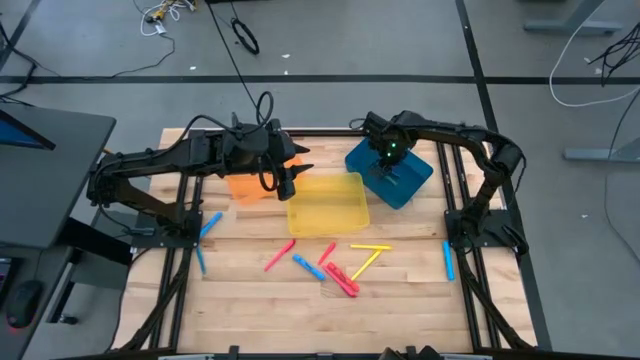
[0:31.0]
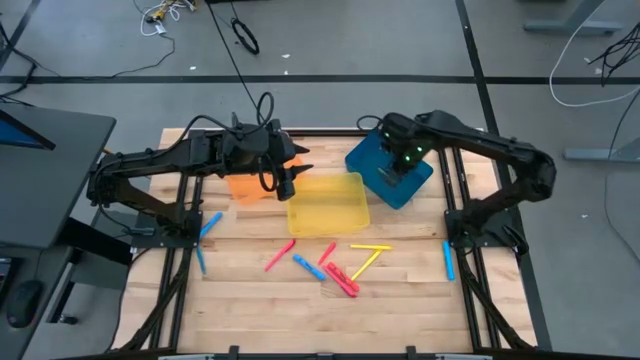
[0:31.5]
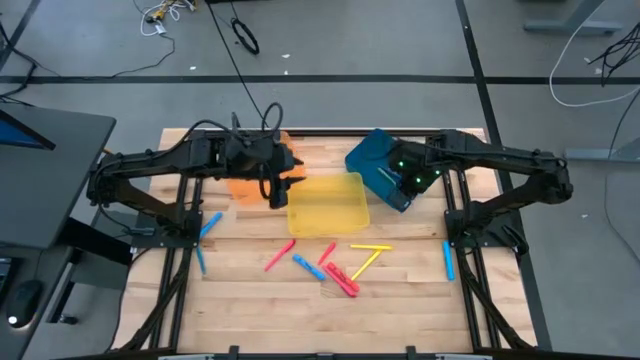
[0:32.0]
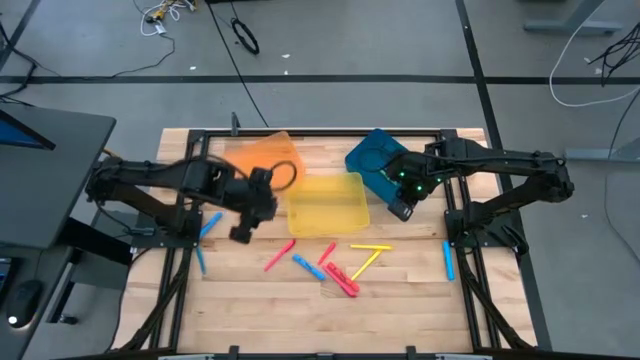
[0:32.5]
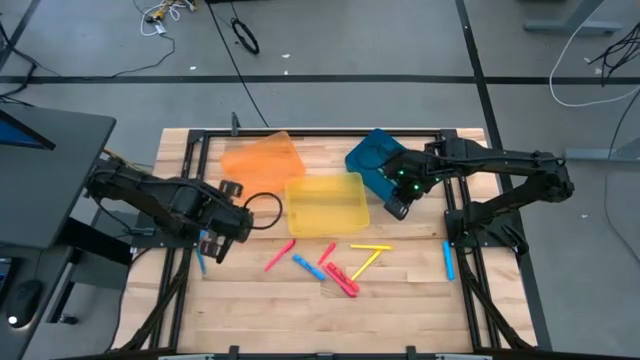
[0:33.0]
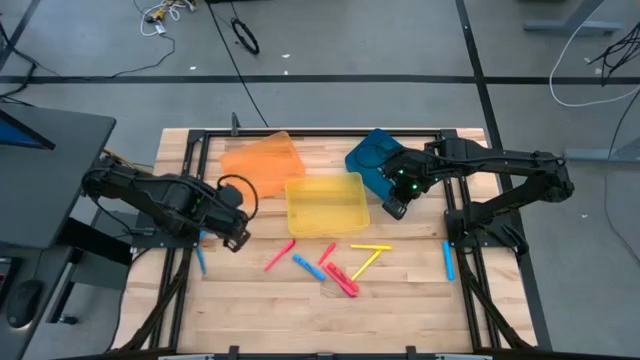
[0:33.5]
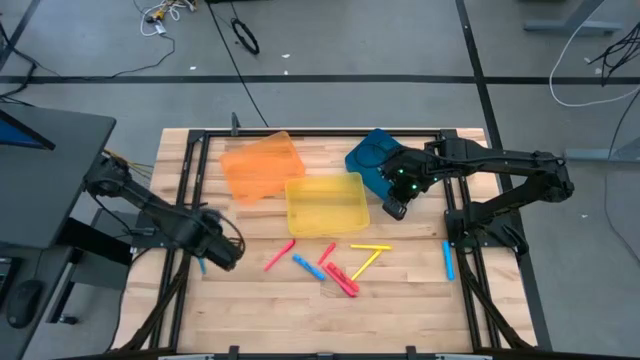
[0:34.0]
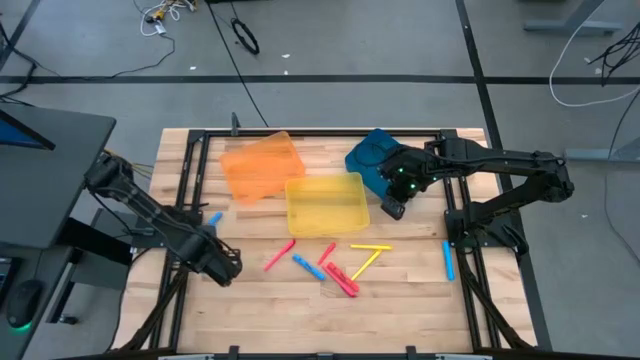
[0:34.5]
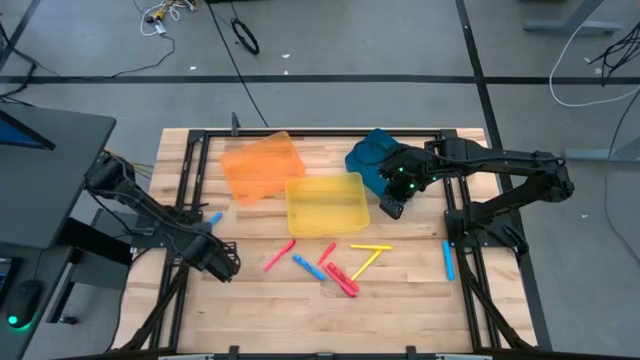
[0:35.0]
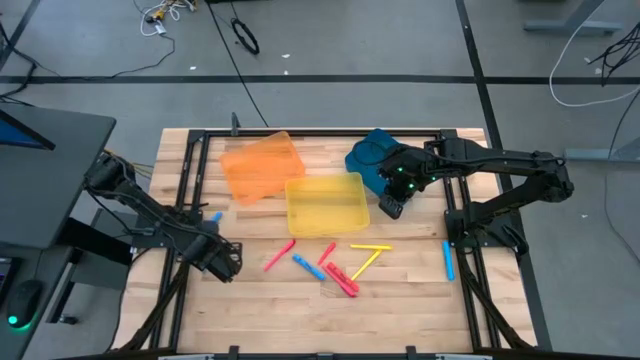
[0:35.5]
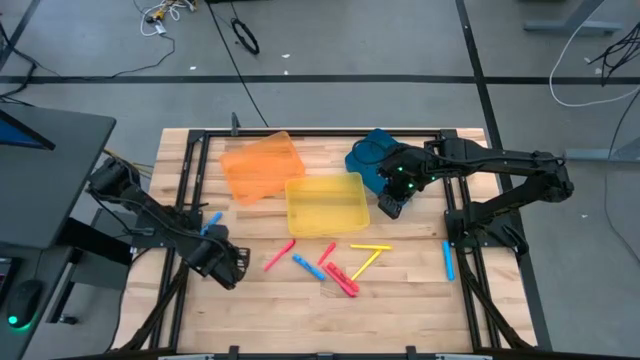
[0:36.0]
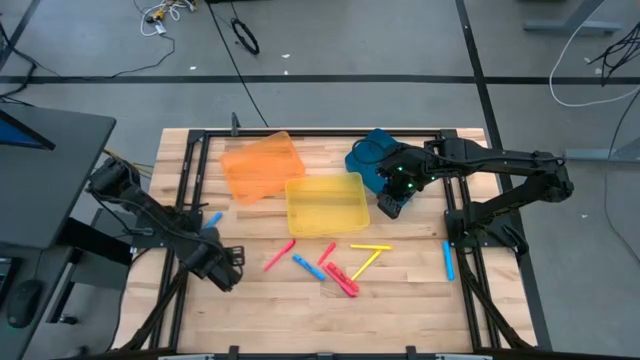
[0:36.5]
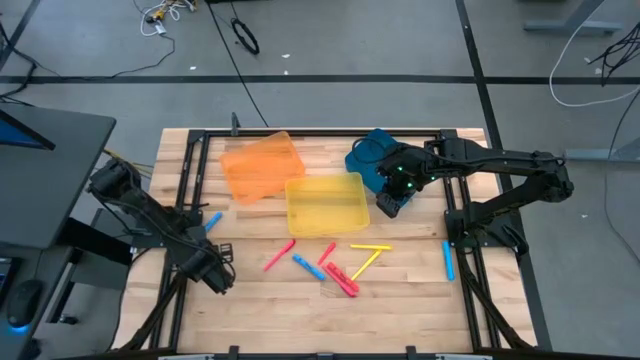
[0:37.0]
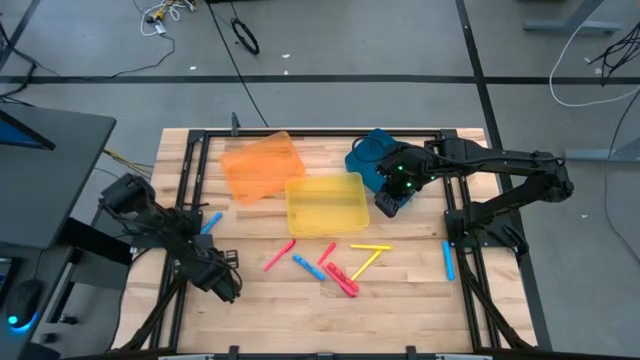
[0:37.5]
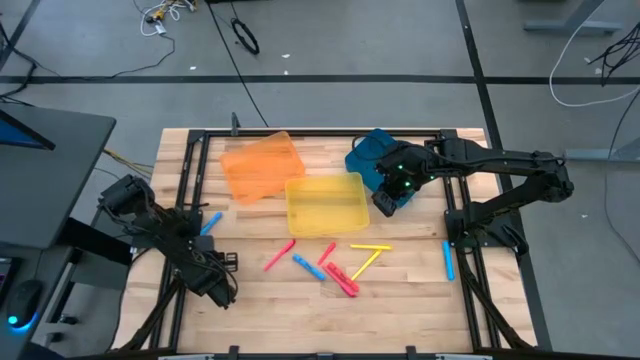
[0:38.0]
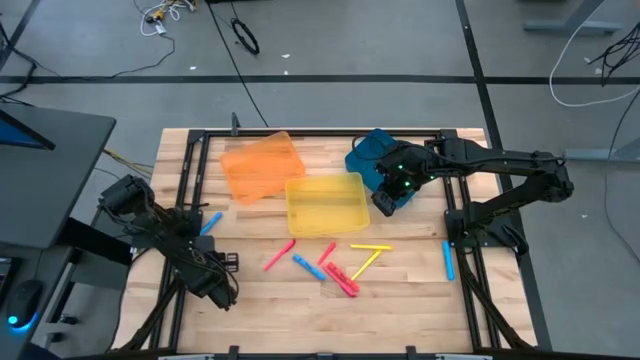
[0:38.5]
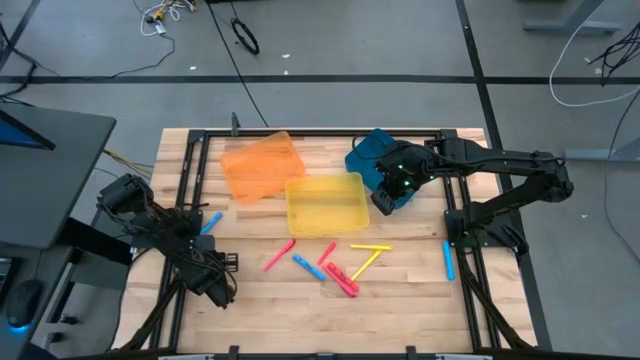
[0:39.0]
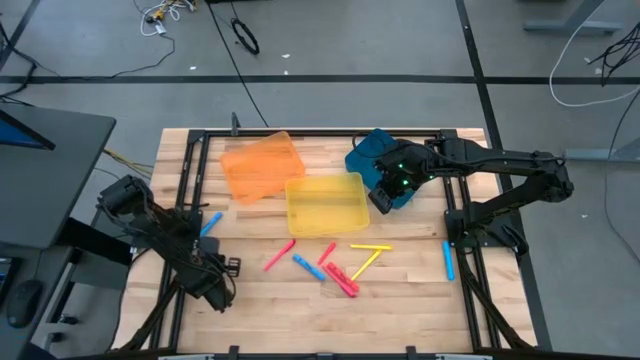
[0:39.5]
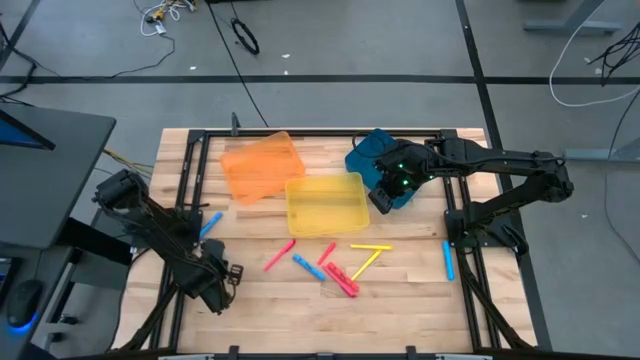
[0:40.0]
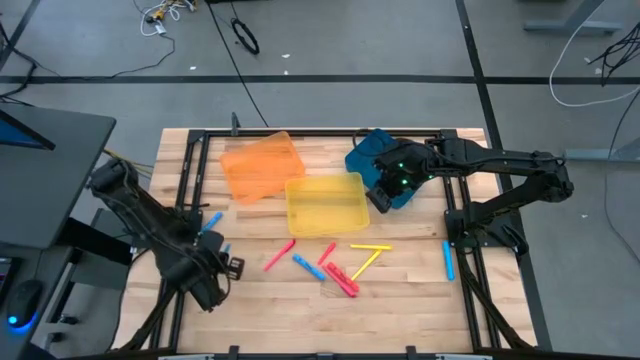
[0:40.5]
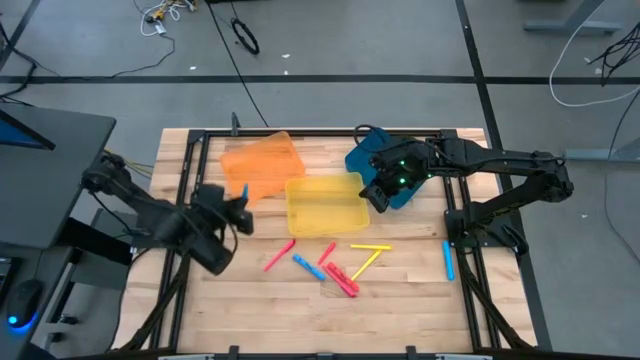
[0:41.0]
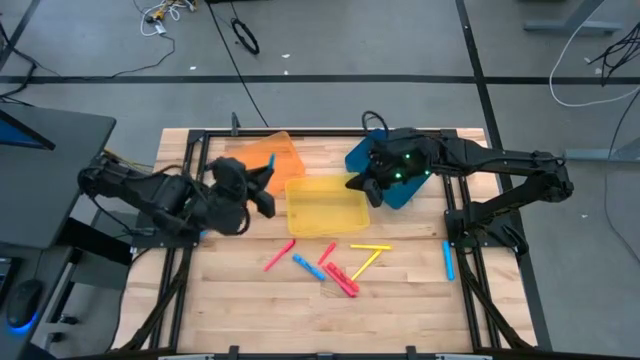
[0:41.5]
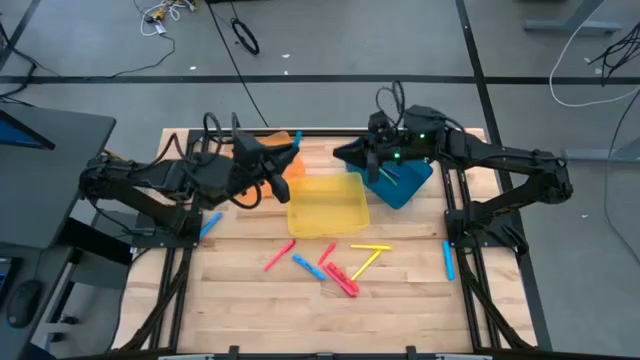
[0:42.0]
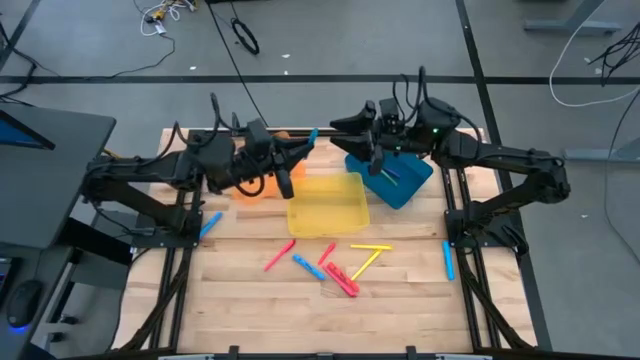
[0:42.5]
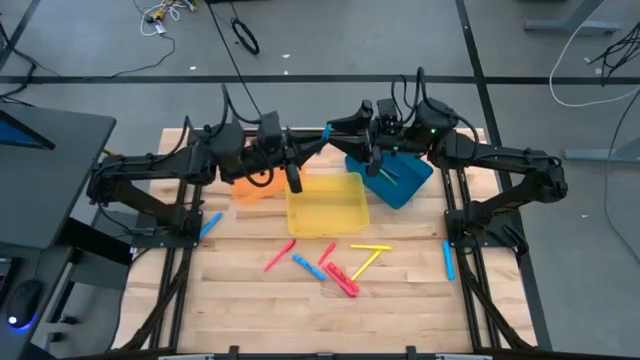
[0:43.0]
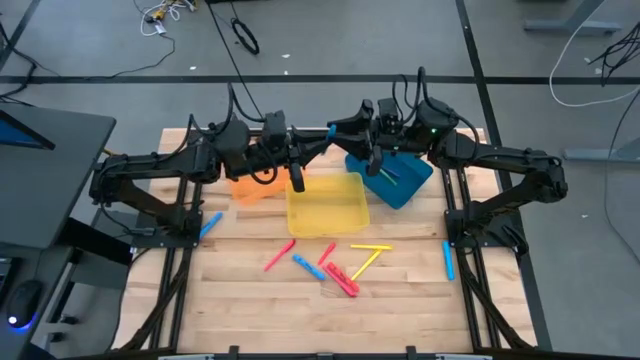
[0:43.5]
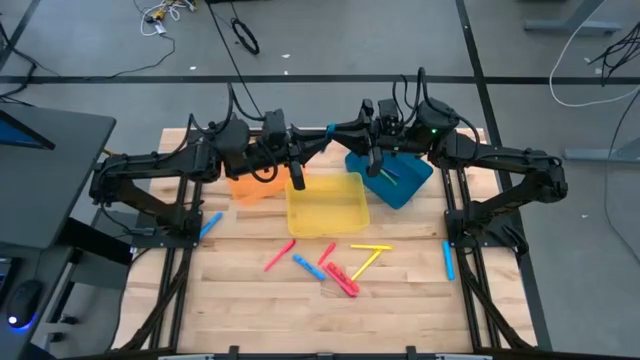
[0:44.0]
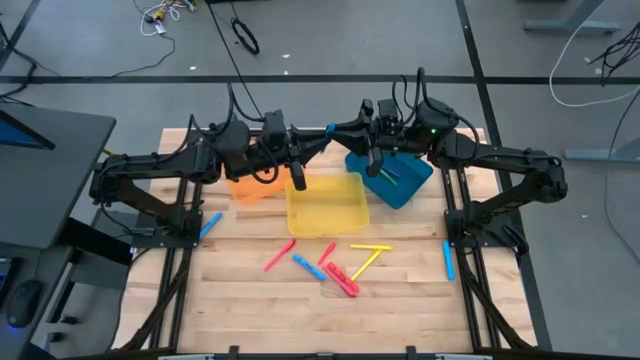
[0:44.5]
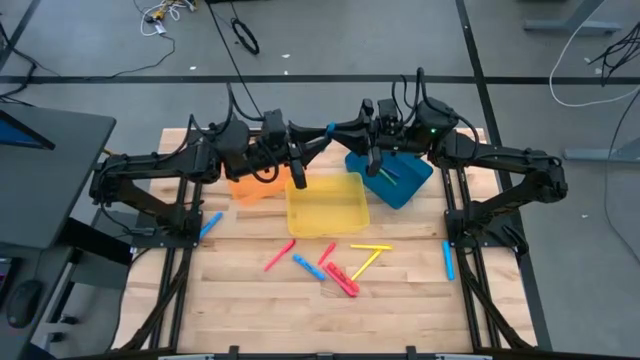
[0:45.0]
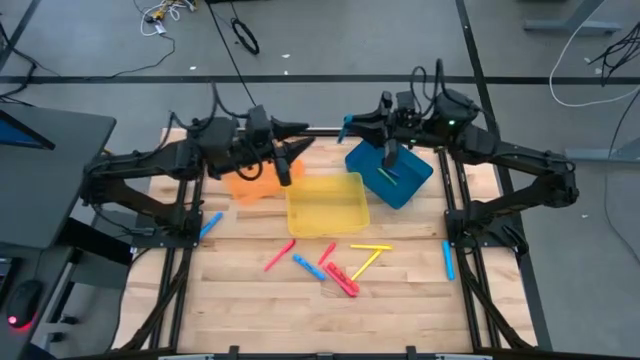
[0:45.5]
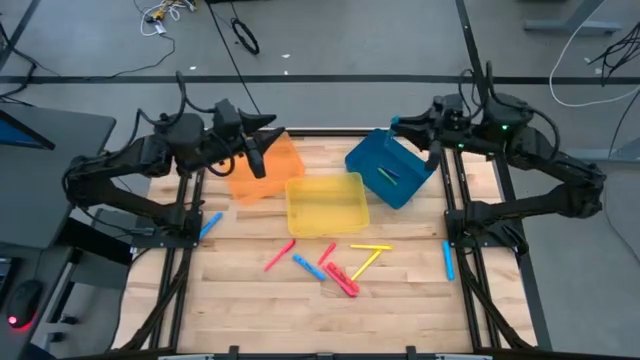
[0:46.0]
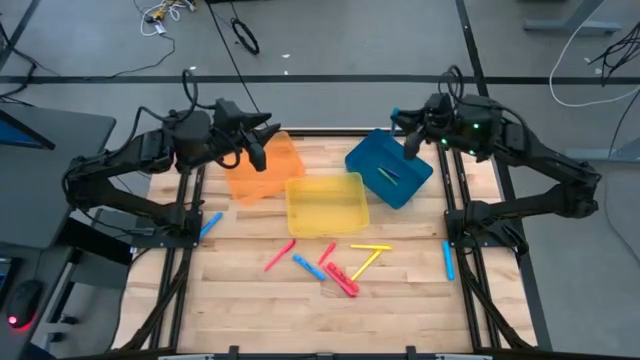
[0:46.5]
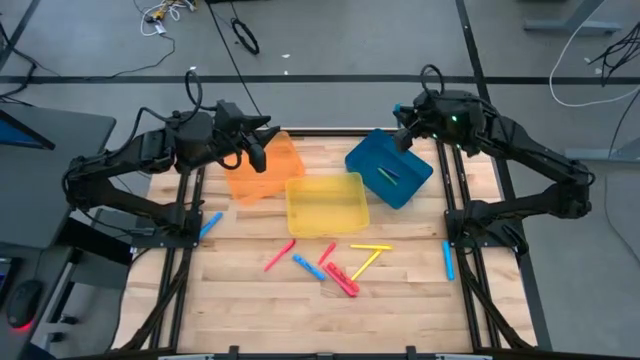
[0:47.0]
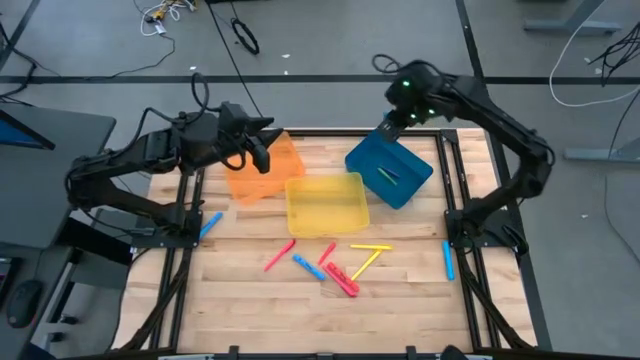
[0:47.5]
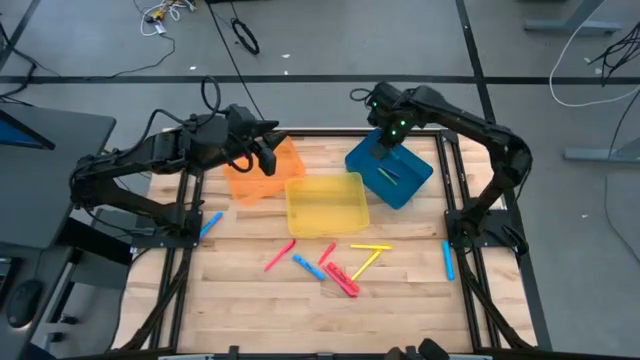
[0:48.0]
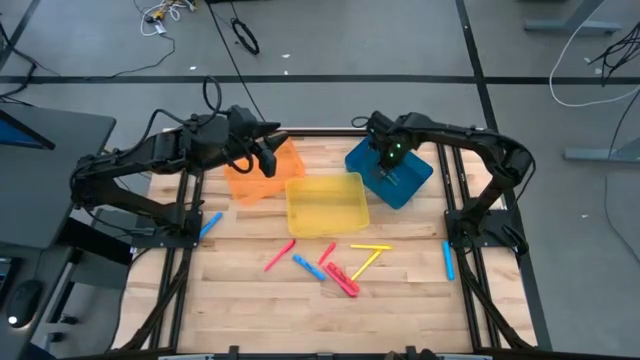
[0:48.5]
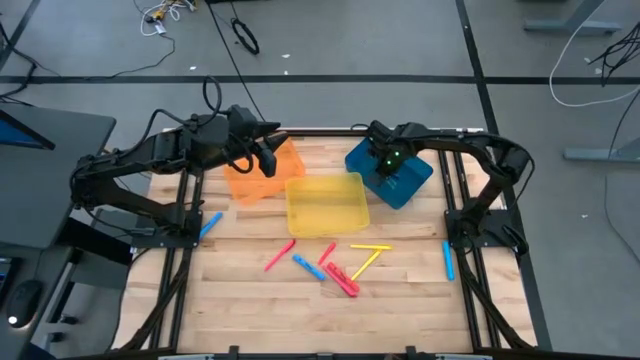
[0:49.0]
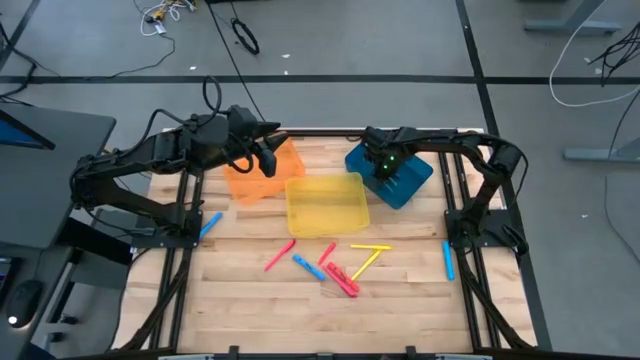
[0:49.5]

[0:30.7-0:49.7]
Task: Pick & Place Markers
Put the blue pen into the blue bin
